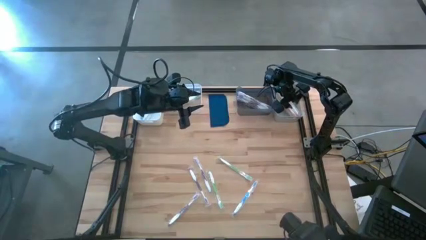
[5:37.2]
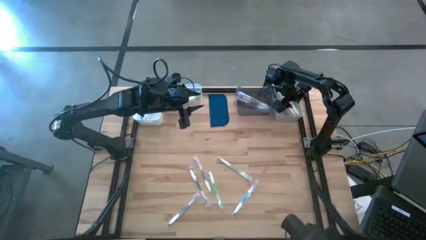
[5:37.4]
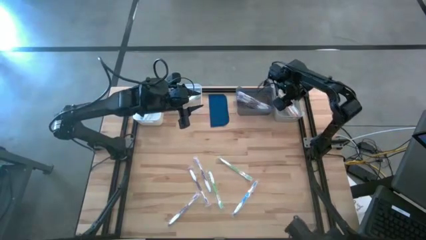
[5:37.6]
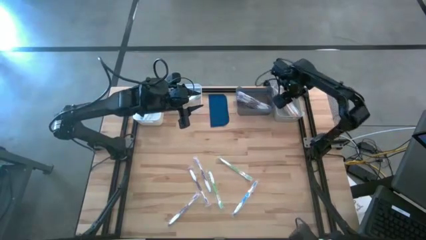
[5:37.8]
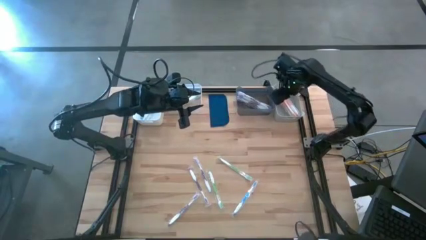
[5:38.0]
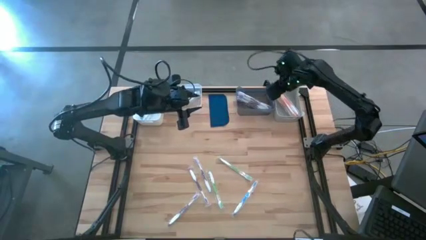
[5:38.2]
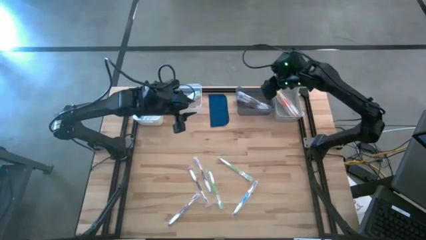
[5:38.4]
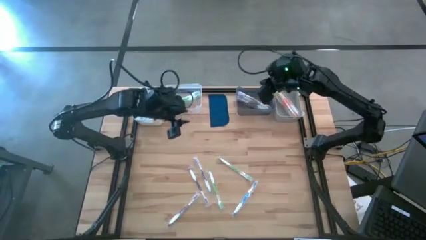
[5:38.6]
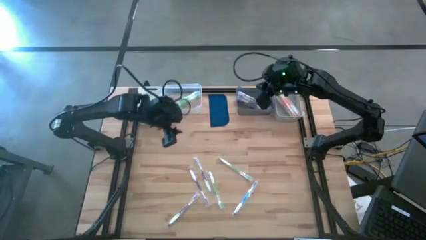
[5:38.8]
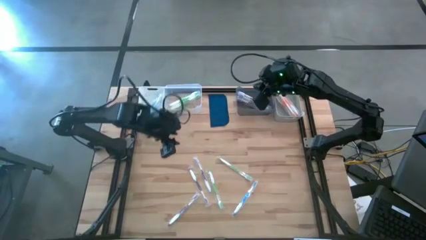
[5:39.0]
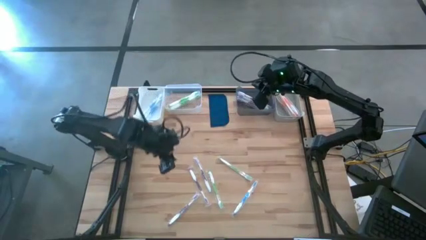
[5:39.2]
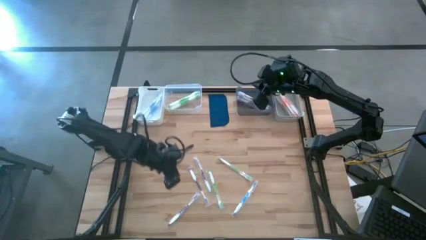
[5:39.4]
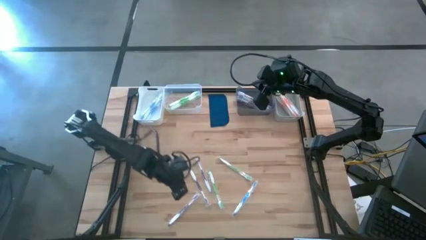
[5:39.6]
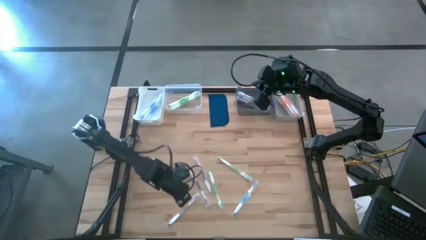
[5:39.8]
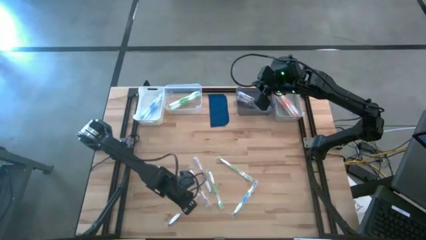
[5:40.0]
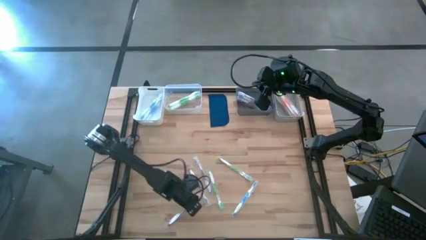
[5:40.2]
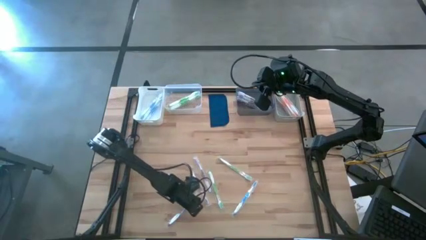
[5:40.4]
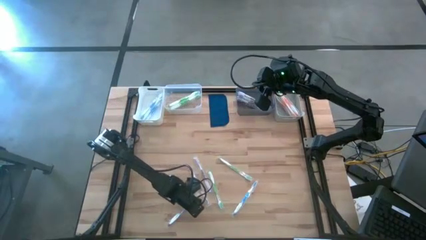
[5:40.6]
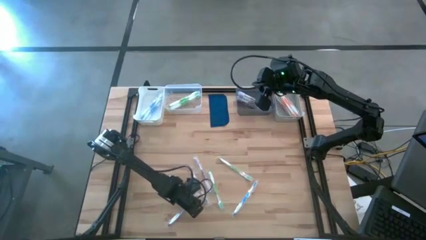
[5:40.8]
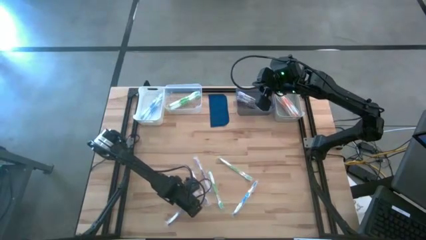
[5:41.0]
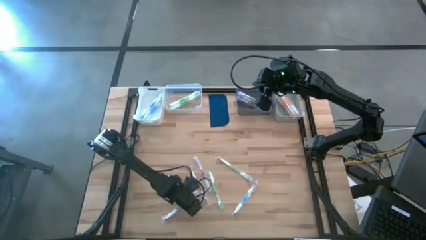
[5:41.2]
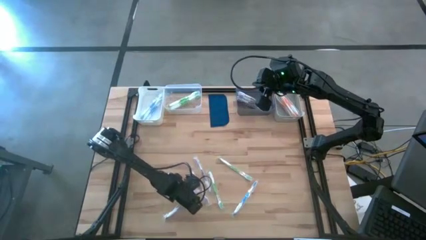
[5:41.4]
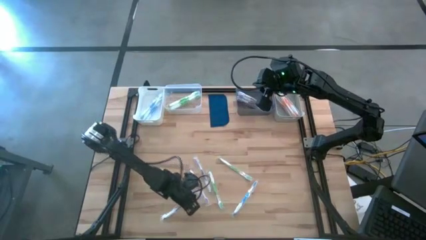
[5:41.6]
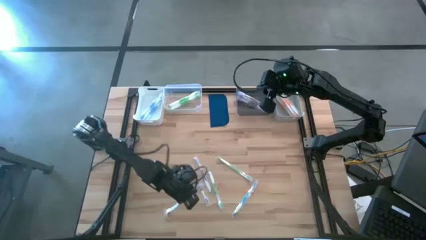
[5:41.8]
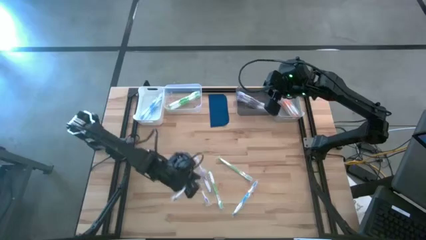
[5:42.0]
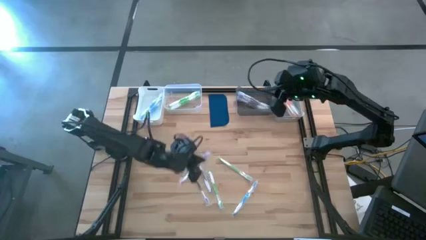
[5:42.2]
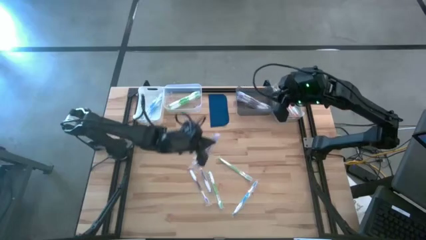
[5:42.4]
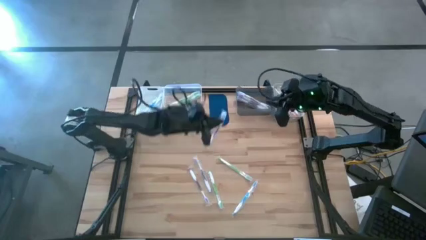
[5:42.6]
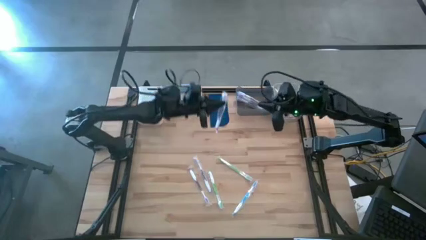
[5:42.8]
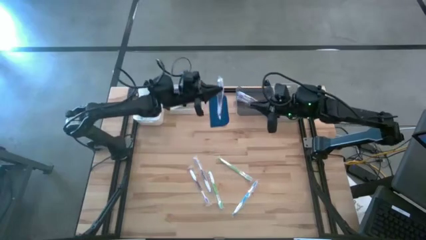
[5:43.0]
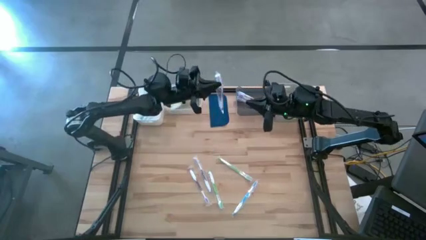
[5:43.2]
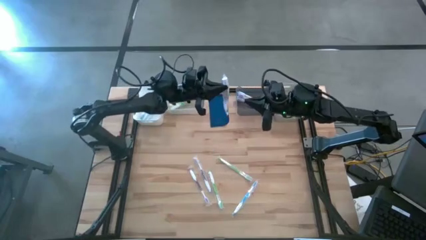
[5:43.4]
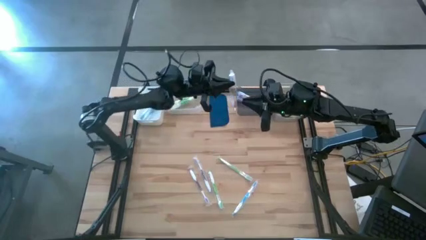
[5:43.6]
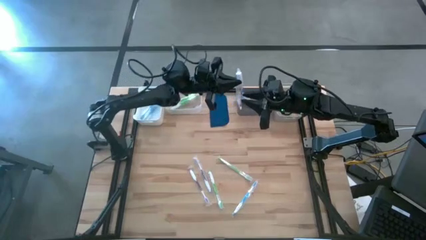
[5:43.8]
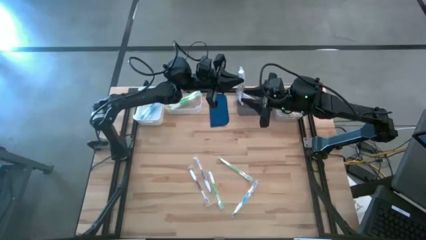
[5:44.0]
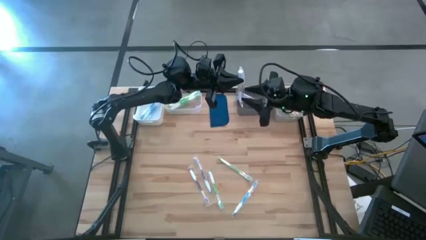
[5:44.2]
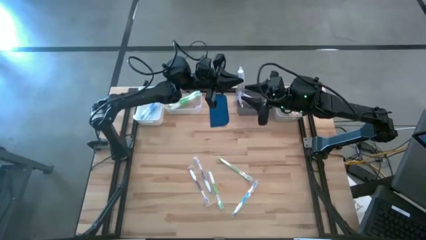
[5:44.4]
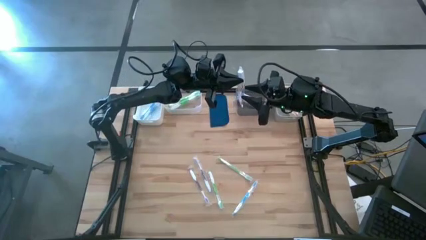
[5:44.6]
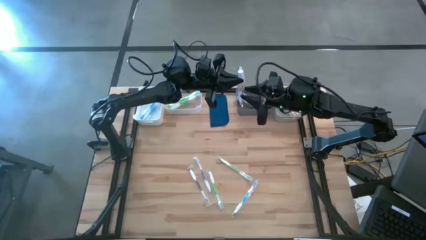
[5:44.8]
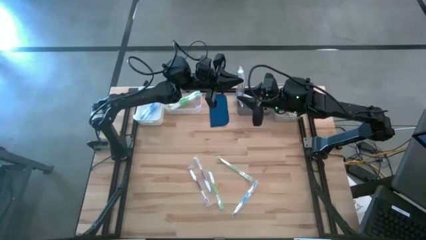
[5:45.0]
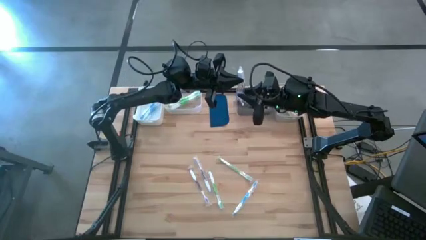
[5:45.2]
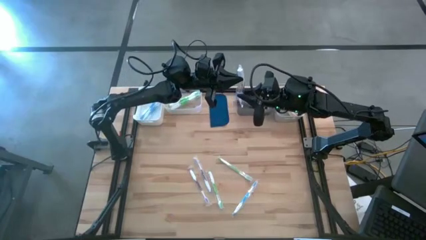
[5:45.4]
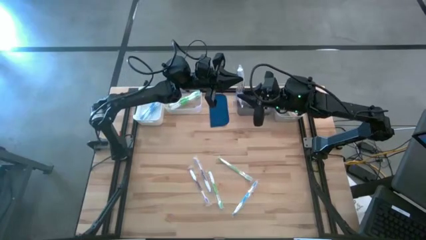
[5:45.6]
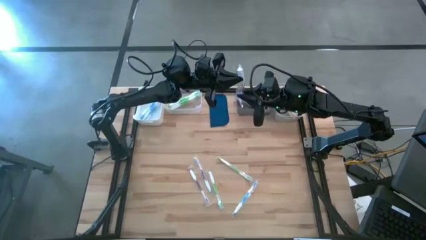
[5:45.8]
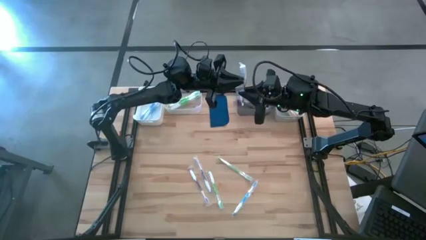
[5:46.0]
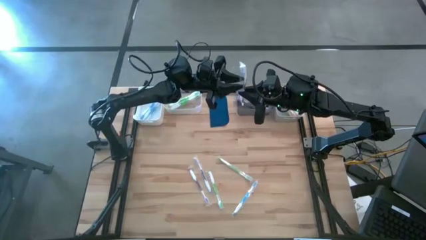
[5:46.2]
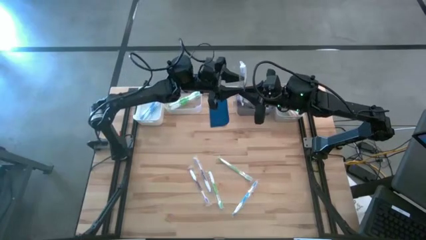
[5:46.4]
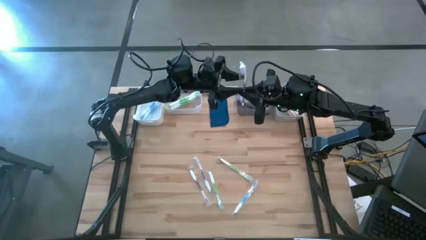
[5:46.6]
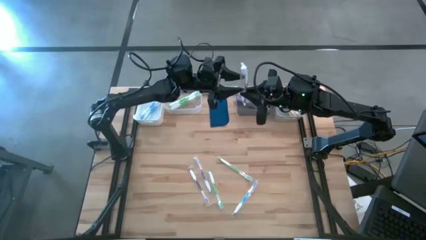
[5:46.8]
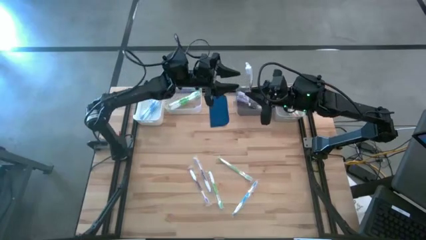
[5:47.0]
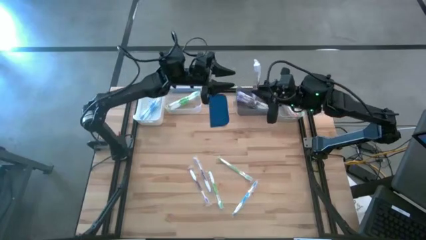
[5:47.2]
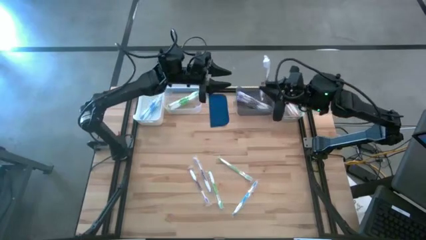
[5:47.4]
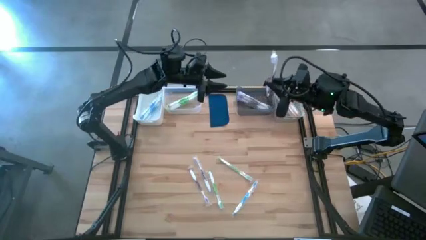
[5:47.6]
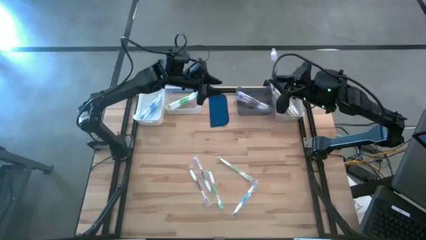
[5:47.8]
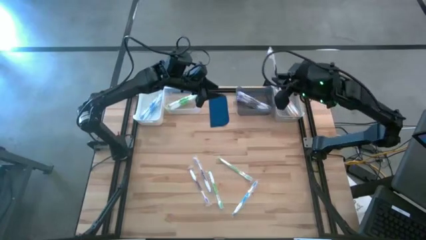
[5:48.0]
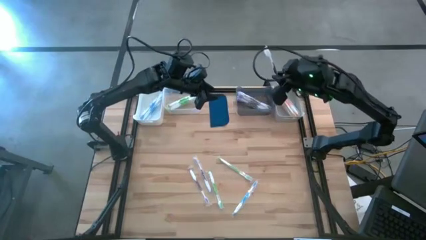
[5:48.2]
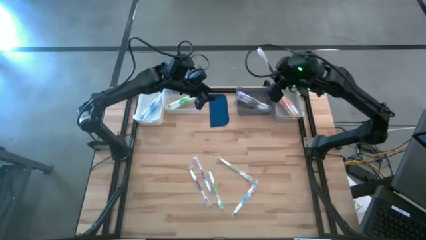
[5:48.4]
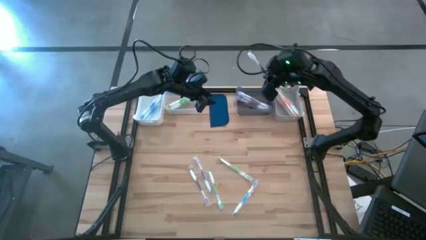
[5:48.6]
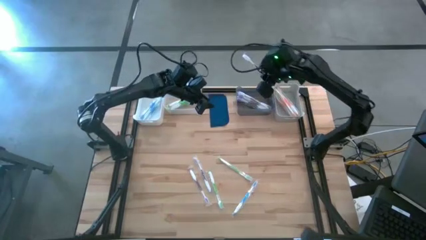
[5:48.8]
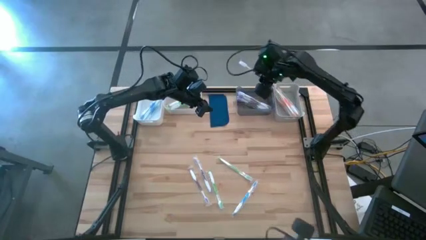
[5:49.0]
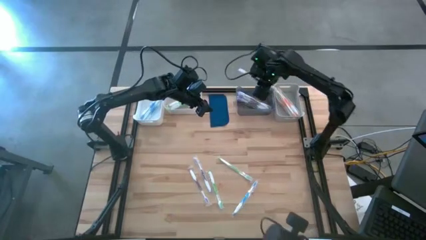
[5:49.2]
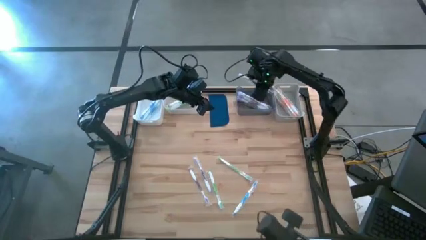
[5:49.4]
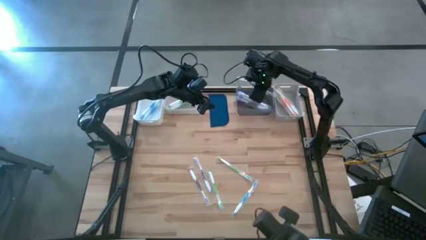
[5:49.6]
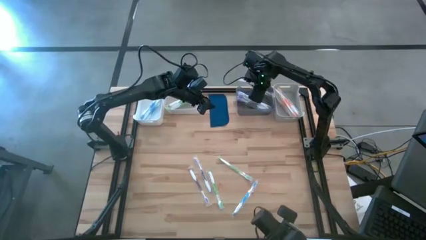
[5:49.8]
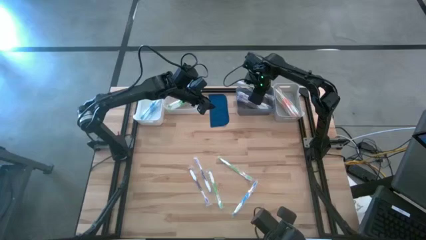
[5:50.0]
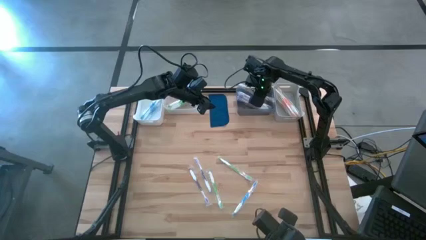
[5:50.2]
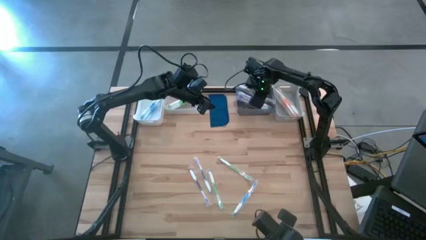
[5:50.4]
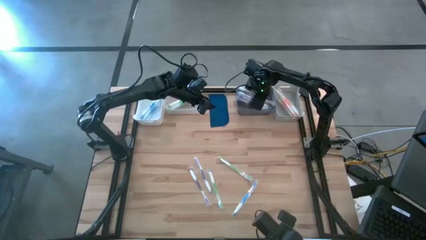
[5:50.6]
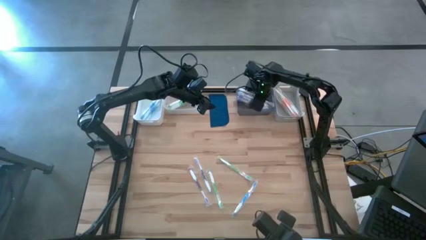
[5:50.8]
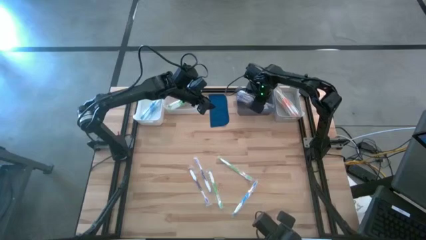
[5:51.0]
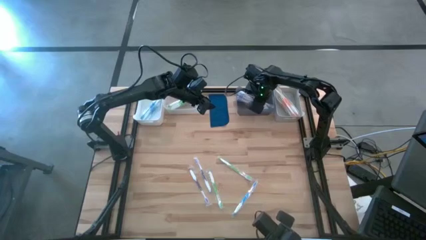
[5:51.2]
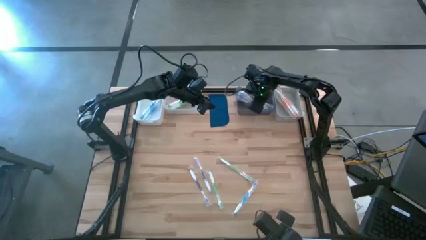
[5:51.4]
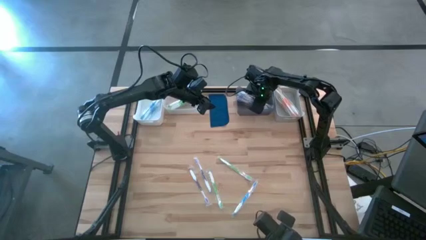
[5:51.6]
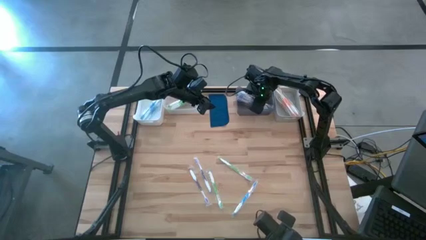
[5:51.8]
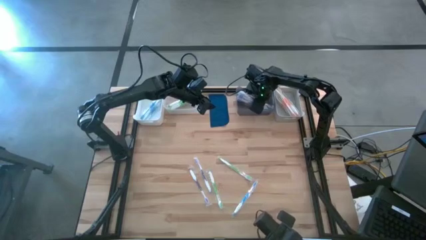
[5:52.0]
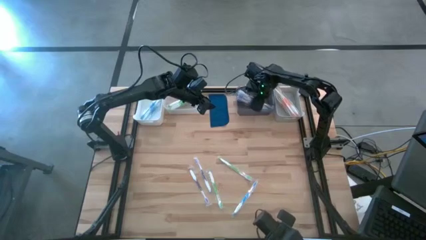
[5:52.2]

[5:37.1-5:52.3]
Task: Pick & Place Toothbrushes
Put the purple toothbrush into the black bin

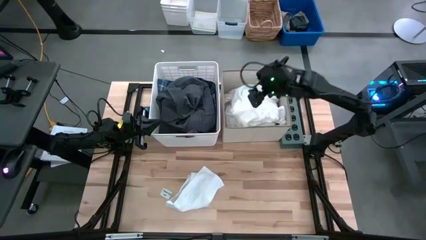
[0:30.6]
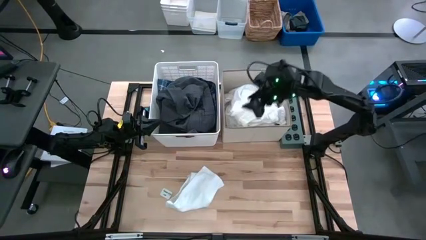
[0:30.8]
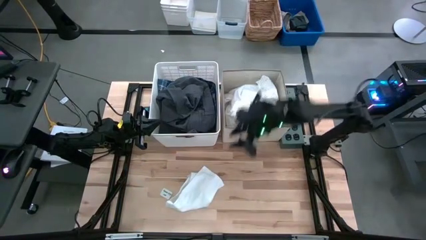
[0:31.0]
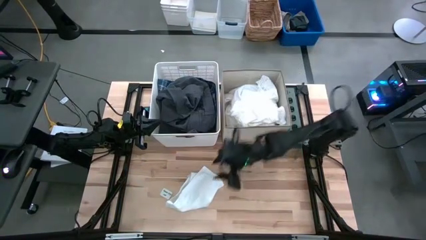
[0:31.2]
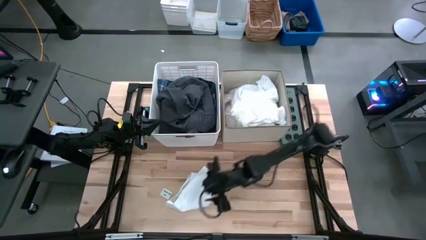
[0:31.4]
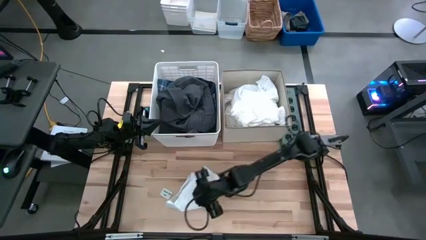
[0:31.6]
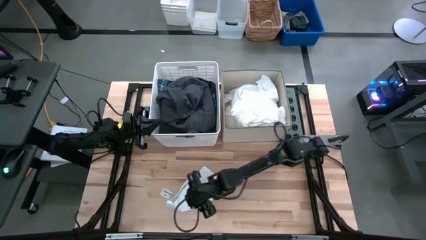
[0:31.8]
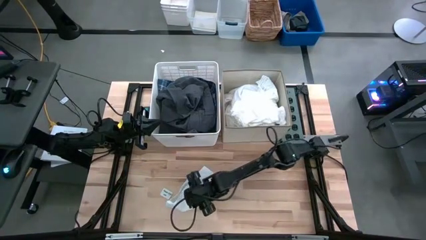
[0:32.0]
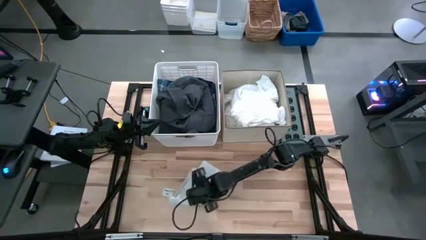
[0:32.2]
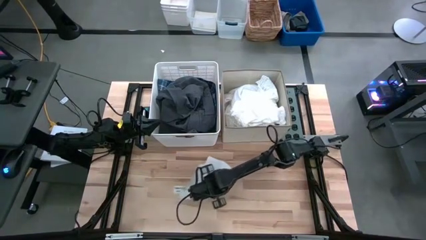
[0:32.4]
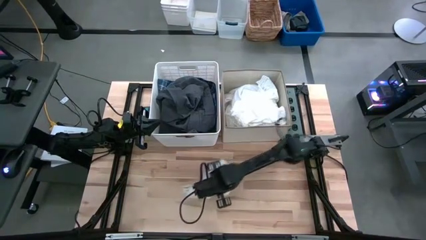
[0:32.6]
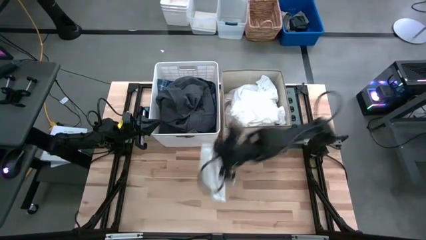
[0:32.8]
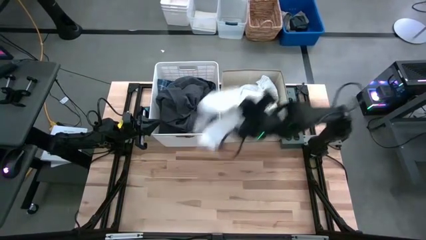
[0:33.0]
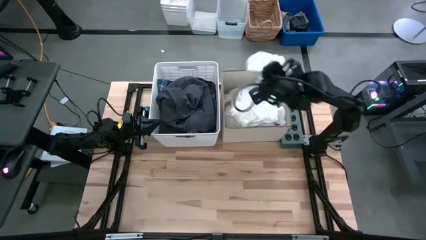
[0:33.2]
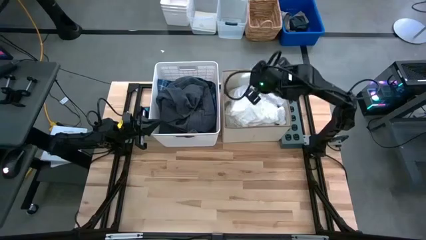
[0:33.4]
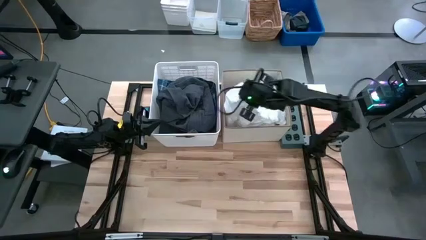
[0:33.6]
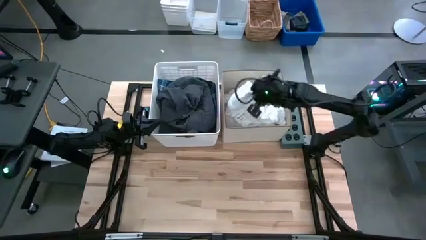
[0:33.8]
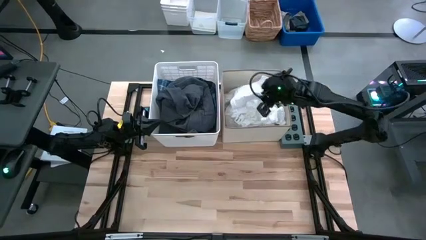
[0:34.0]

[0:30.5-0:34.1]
Task: Sort clothes
Put the white microfiber cloth into the laundry organizer
